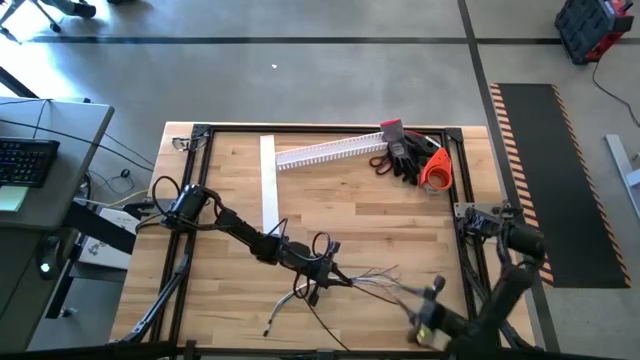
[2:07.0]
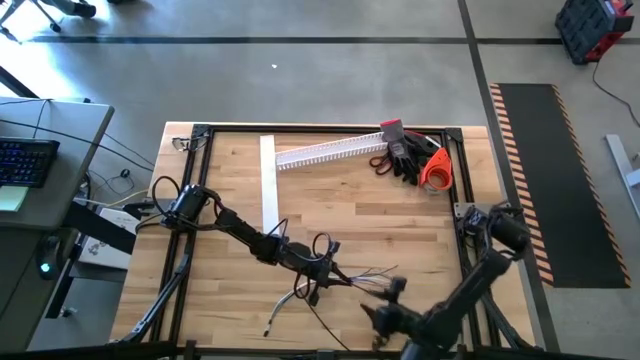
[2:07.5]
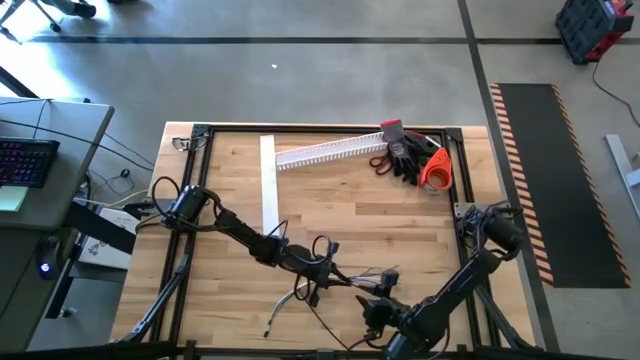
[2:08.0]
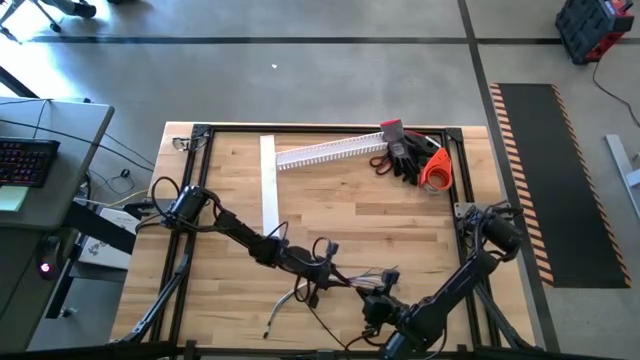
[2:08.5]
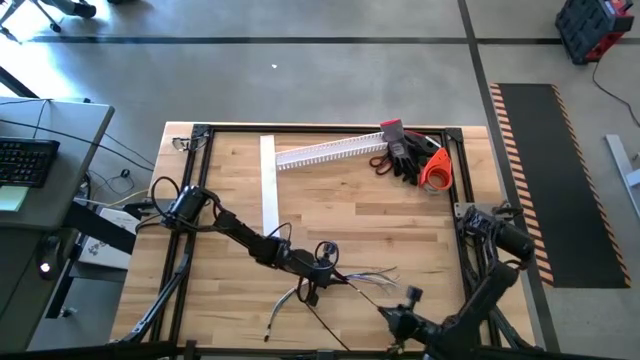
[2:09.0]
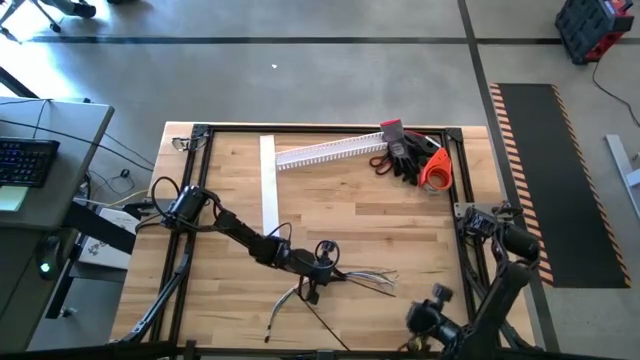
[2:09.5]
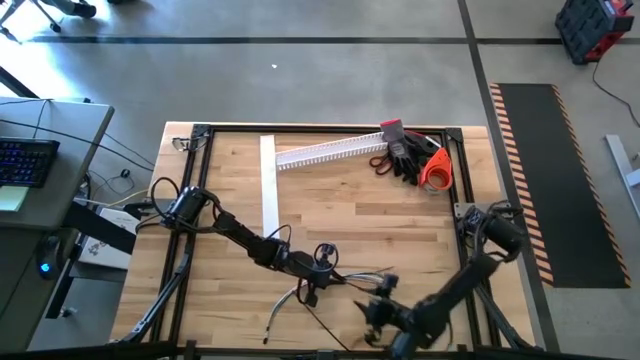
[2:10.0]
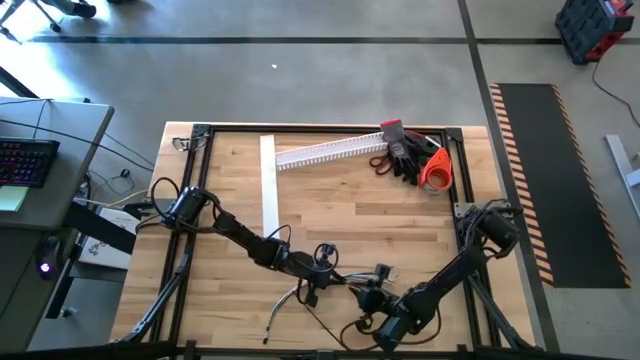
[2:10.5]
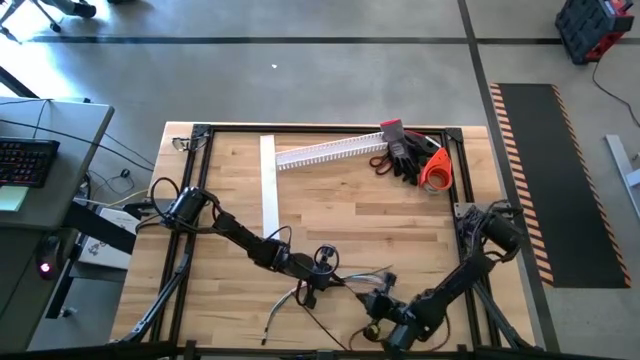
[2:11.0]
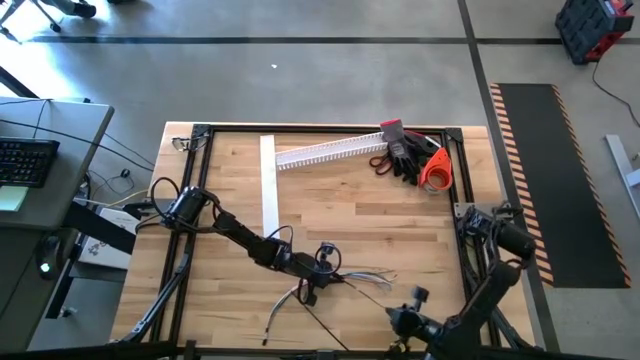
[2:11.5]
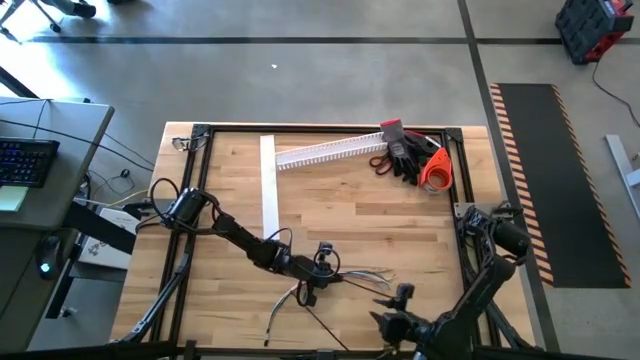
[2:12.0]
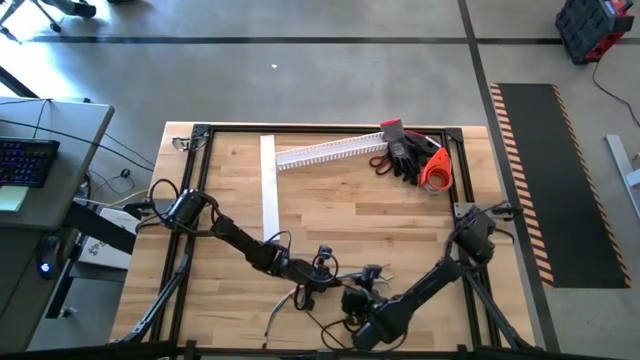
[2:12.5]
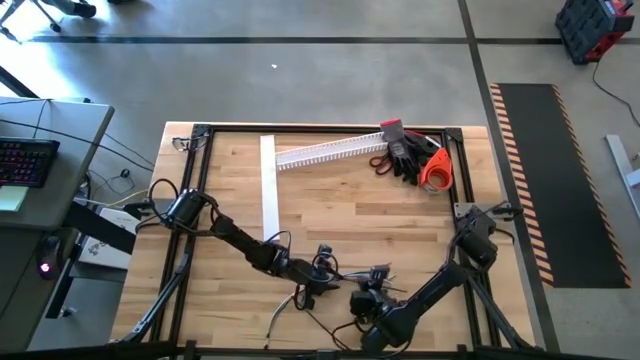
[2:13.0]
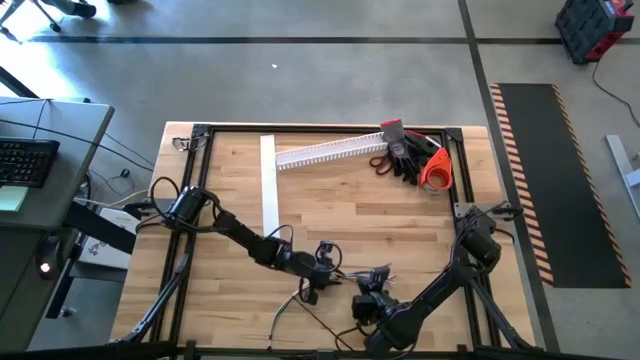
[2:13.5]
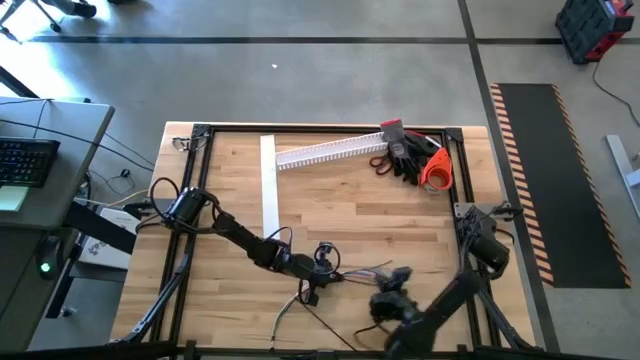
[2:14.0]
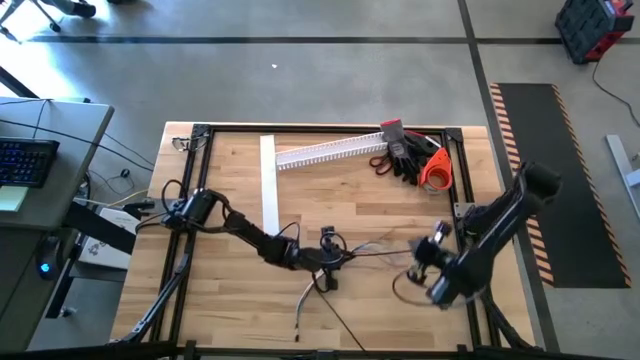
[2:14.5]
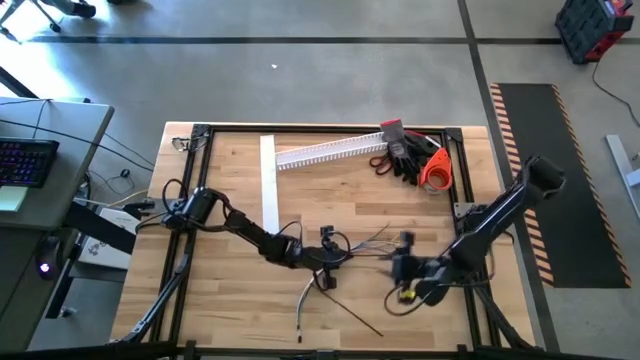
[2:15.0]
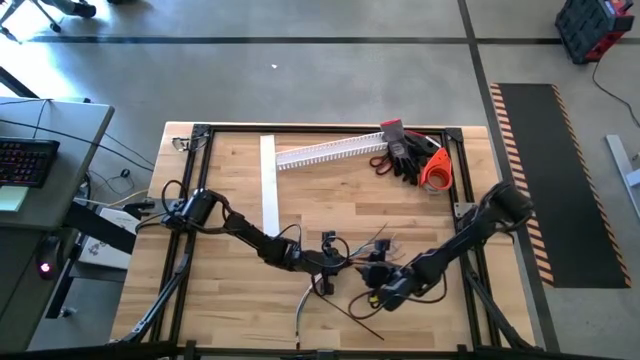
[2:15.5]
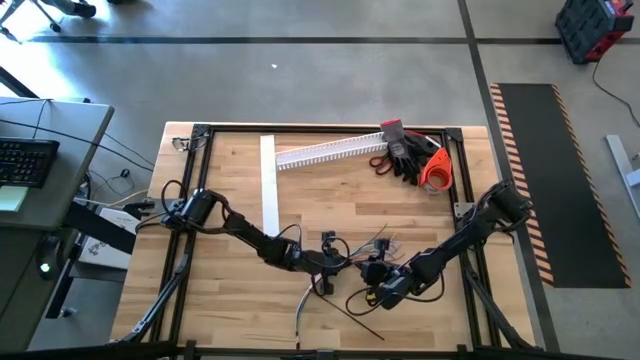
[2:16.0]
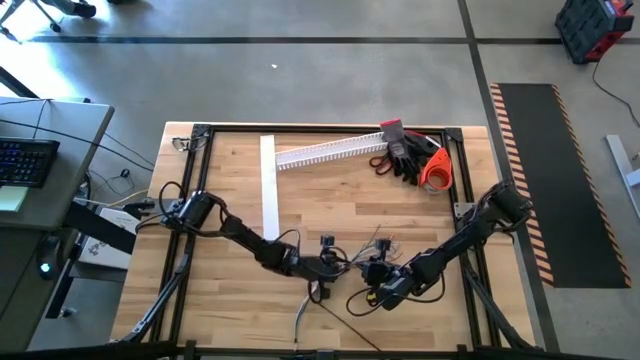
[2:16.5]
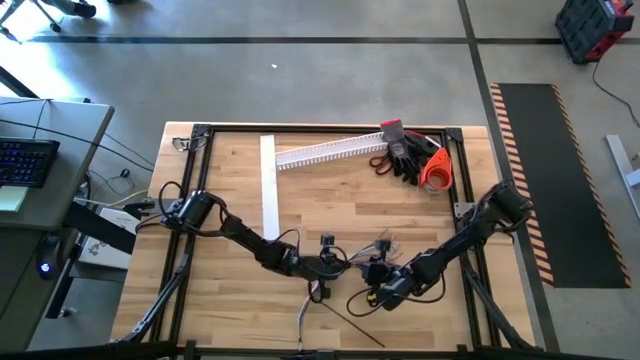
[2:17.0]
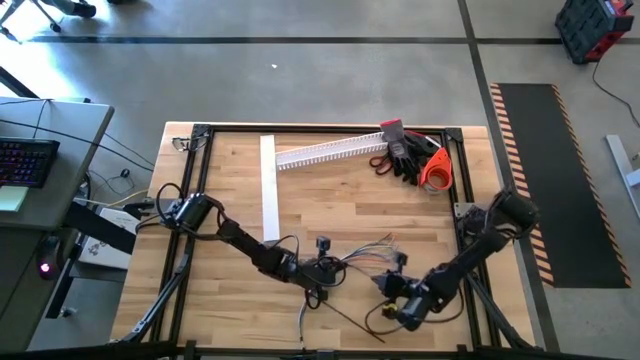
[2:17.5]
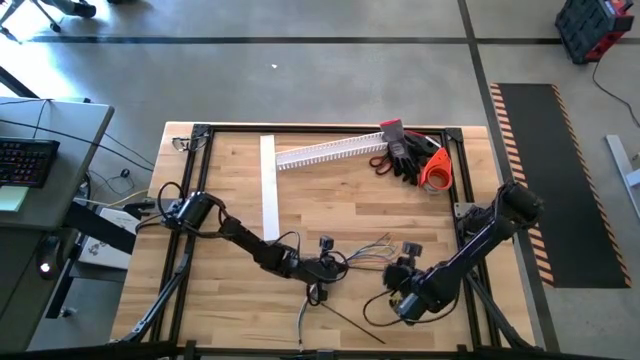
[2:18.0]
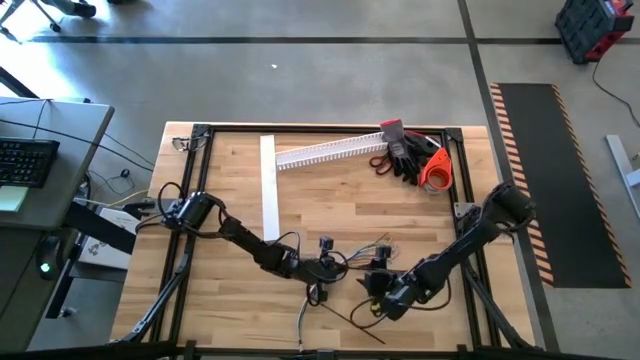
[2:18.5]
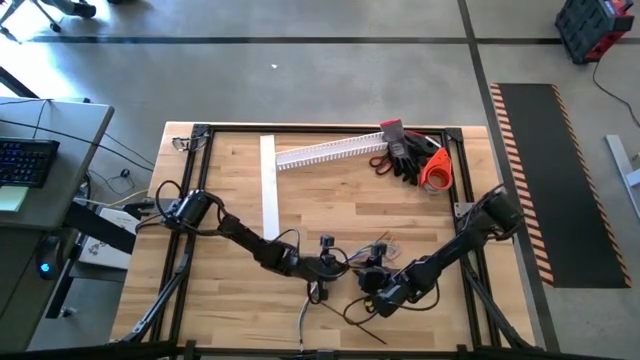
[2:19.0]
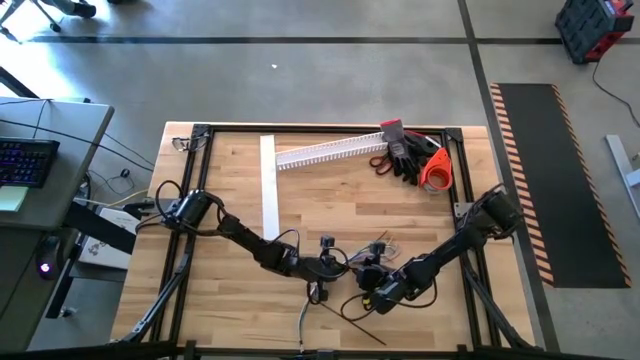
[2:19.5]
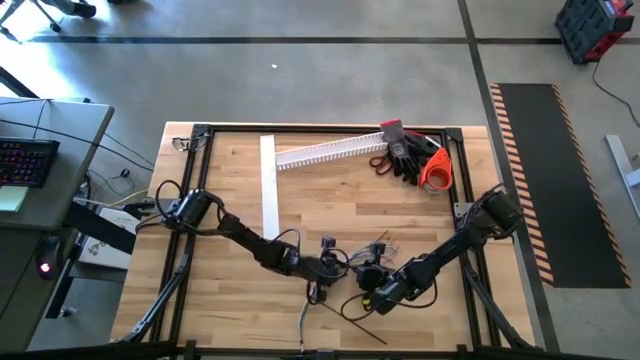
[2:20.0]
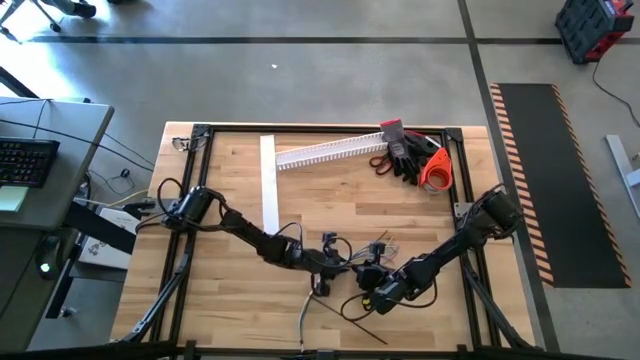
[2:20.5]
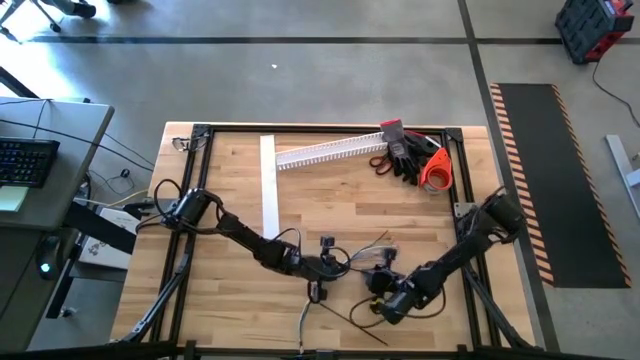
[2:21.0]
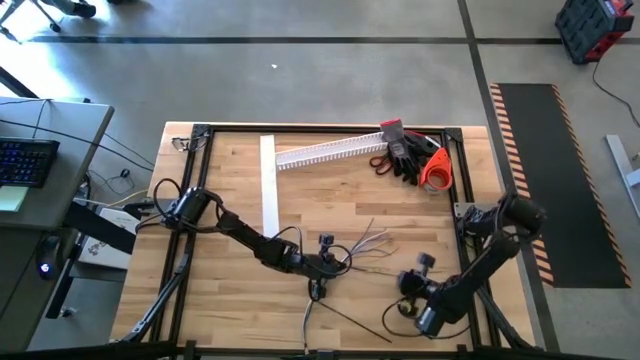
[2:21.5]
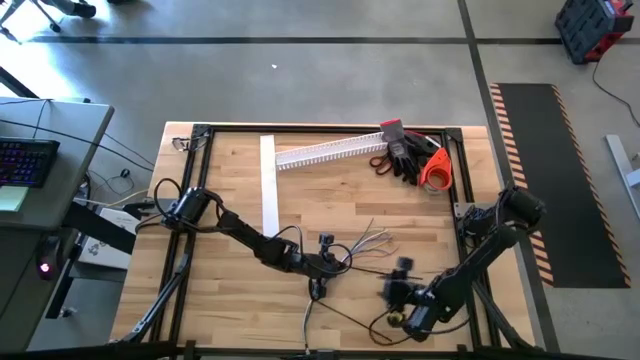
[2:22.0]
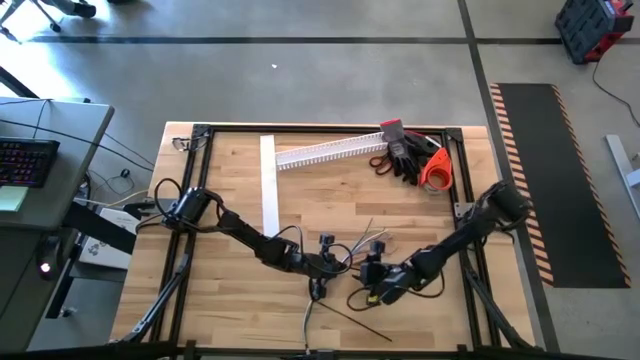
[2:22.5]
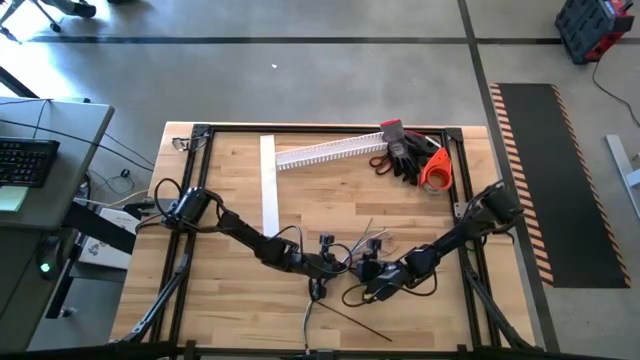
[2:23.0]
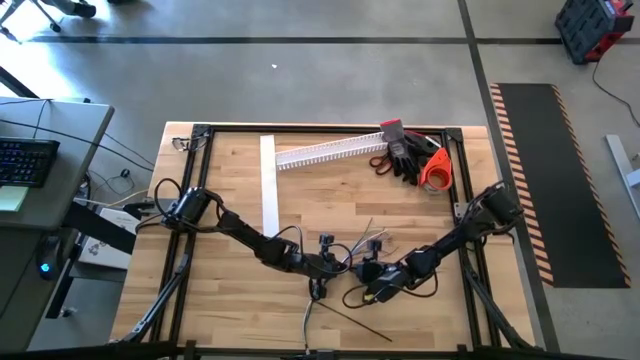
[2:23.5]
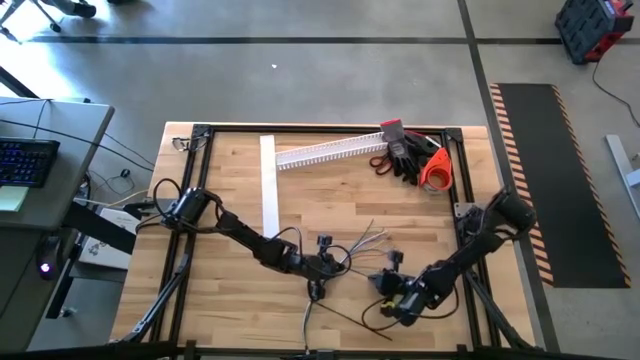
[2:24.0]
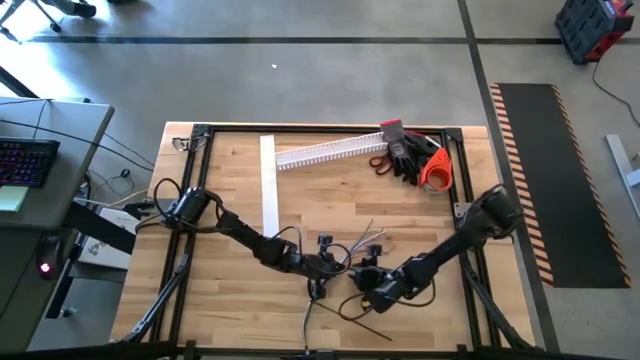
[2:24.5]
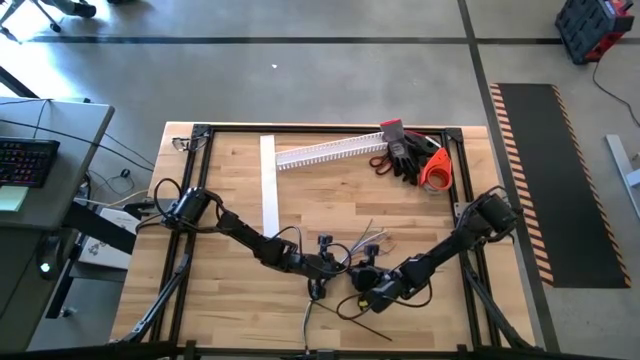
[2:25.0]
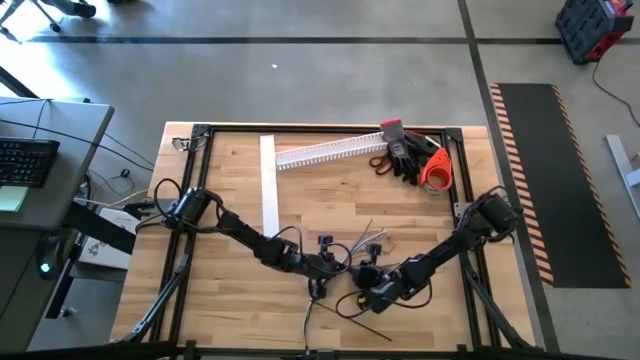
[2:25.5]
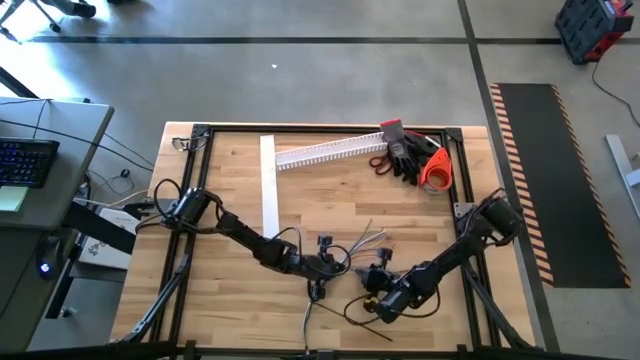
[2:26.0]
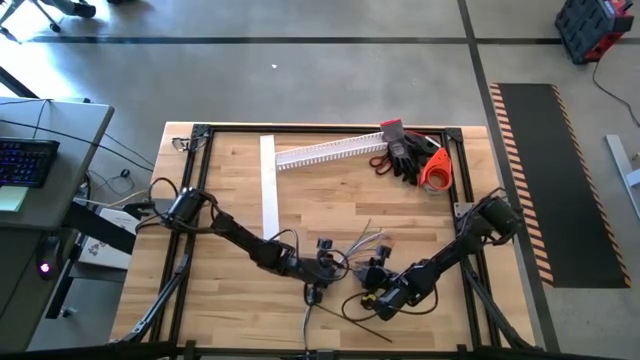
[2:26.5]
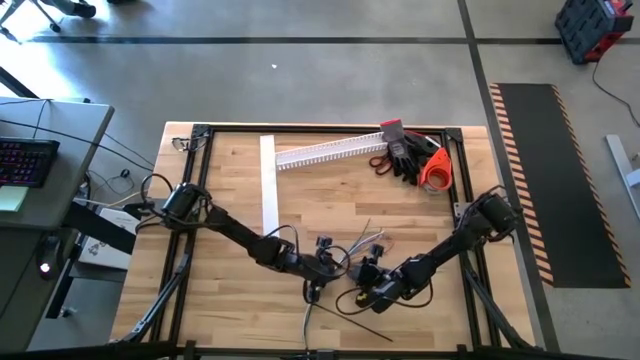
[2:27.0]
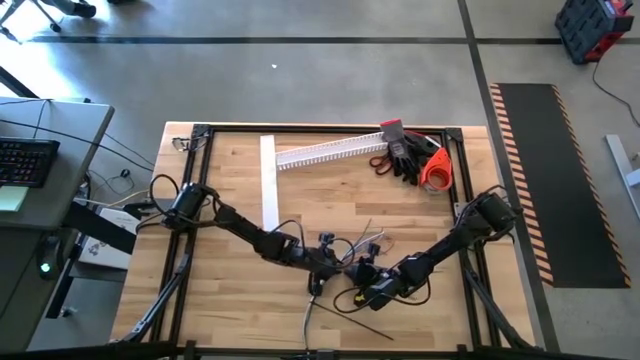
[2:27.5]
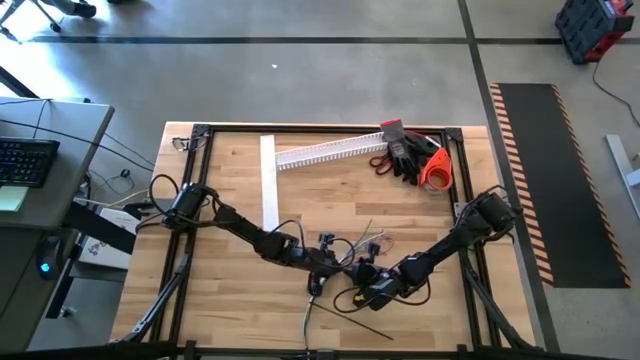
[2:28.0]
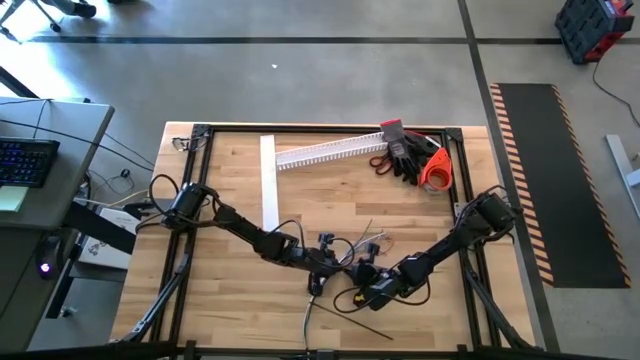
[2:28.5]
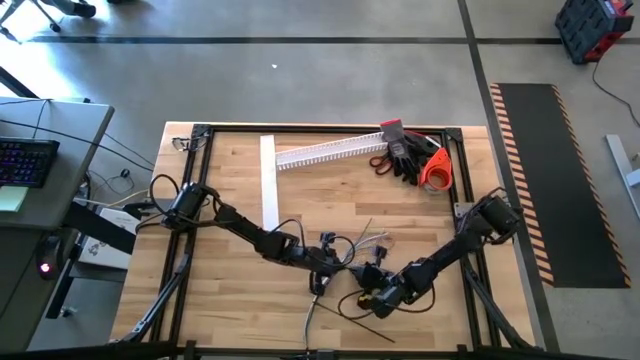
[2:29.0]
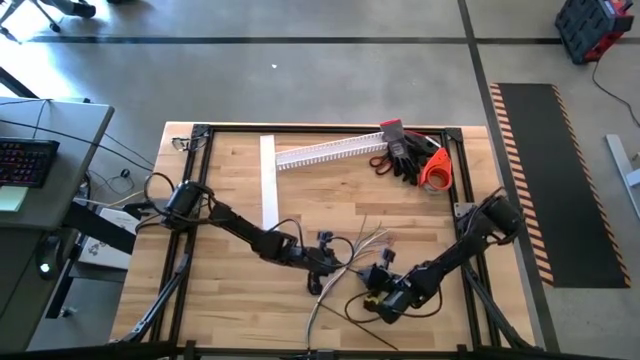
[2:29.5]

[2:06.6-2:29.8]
Task: Ziptie cables
Wrap the cable wires with the black zip tie
